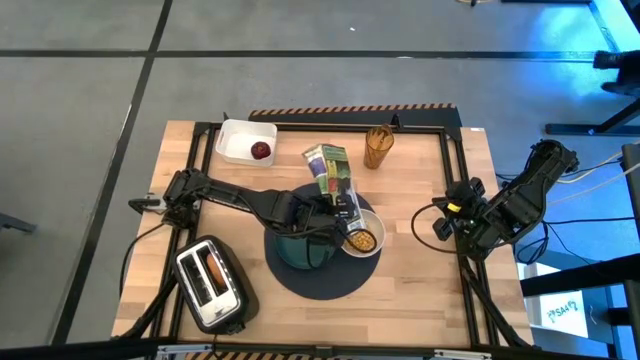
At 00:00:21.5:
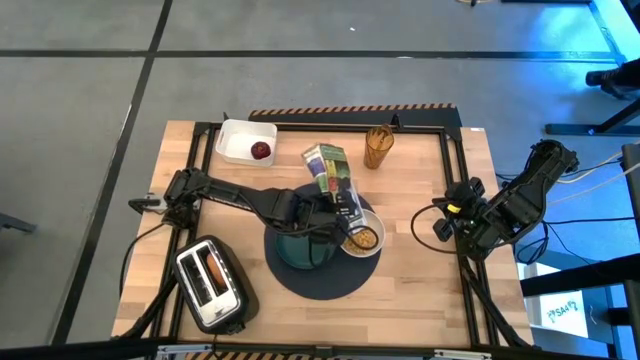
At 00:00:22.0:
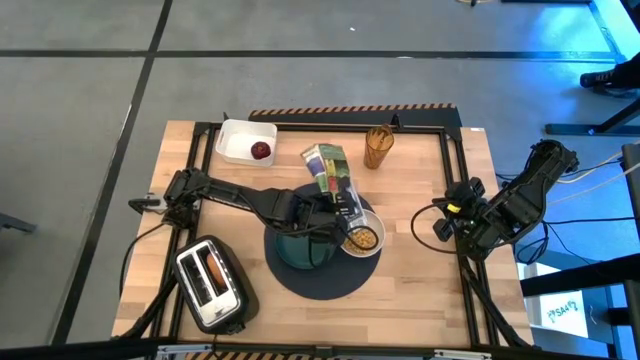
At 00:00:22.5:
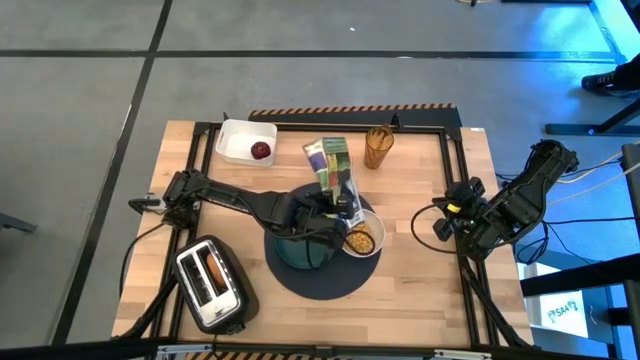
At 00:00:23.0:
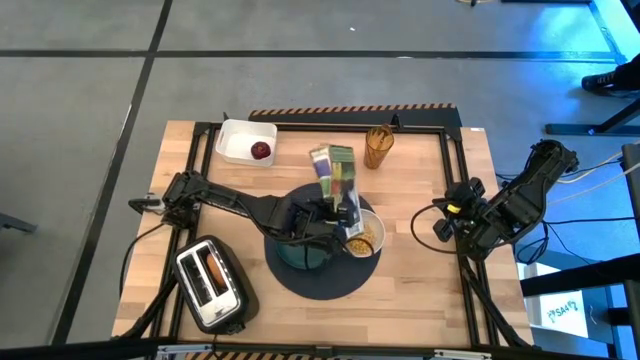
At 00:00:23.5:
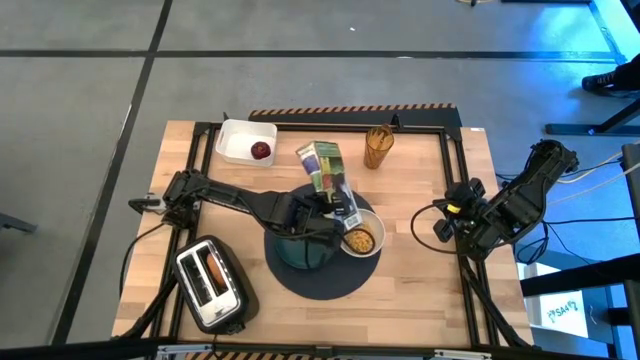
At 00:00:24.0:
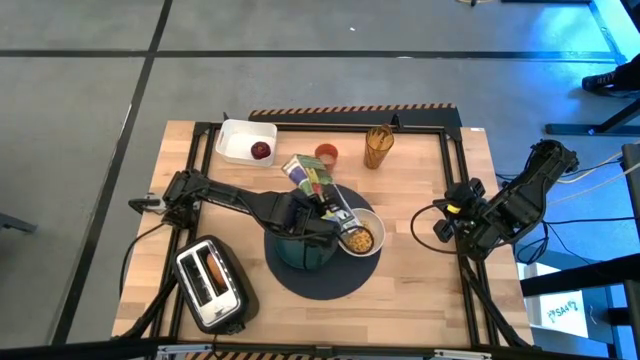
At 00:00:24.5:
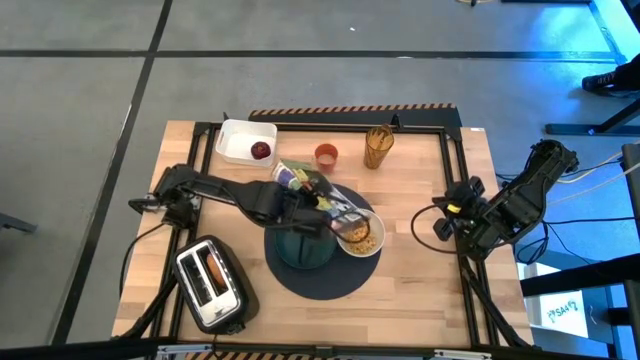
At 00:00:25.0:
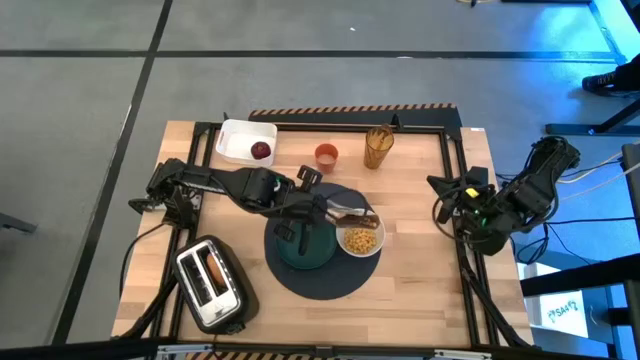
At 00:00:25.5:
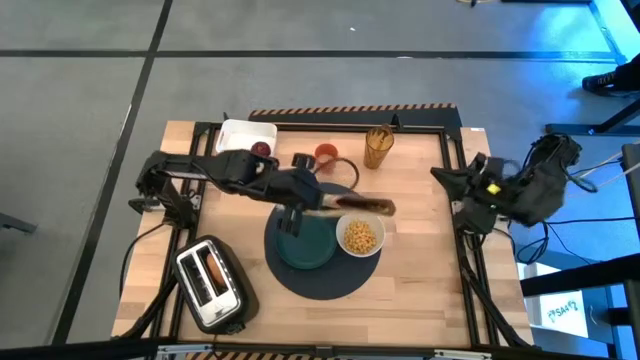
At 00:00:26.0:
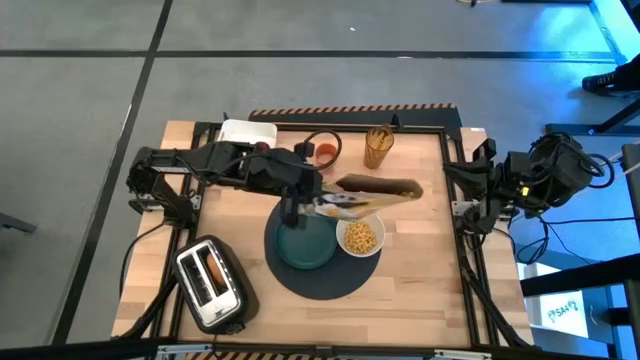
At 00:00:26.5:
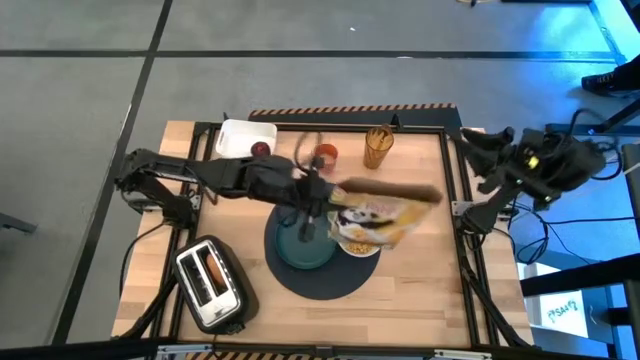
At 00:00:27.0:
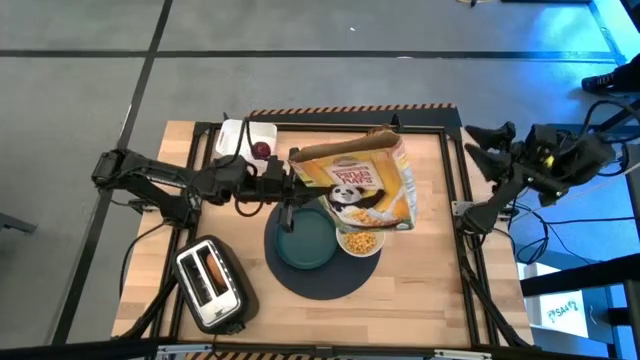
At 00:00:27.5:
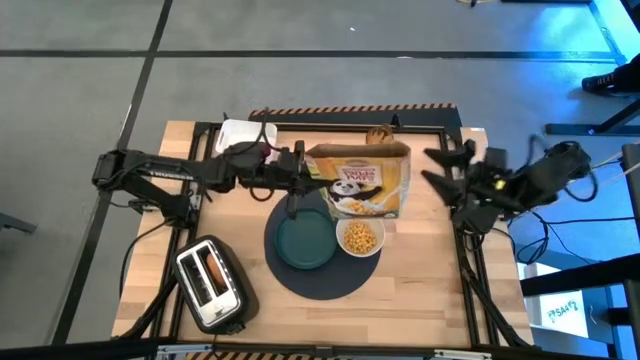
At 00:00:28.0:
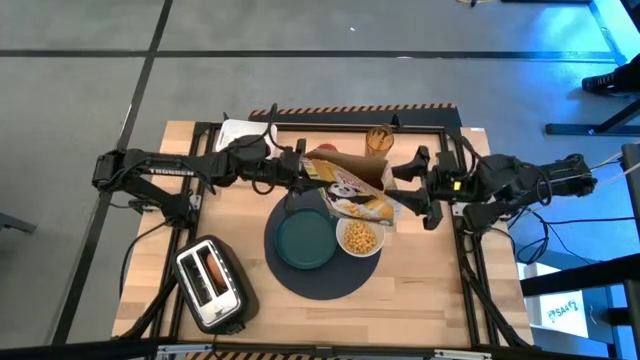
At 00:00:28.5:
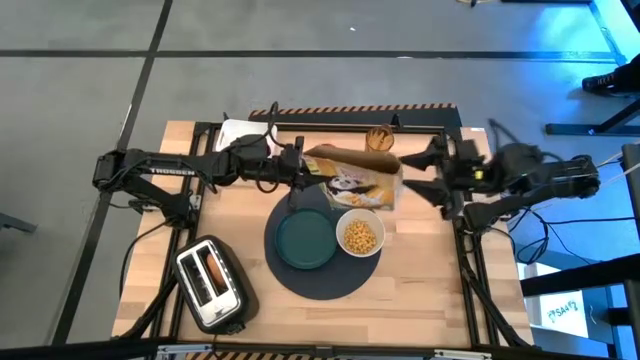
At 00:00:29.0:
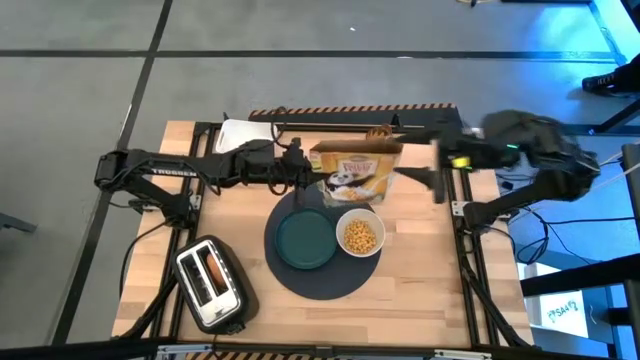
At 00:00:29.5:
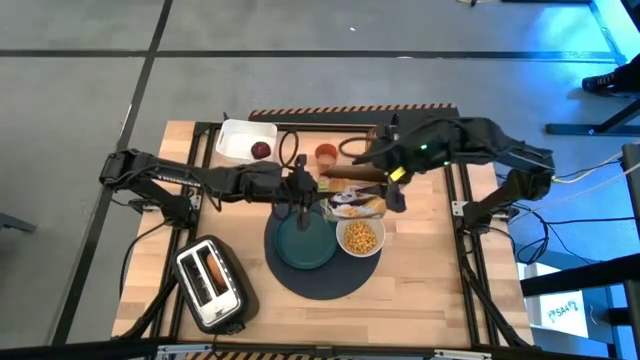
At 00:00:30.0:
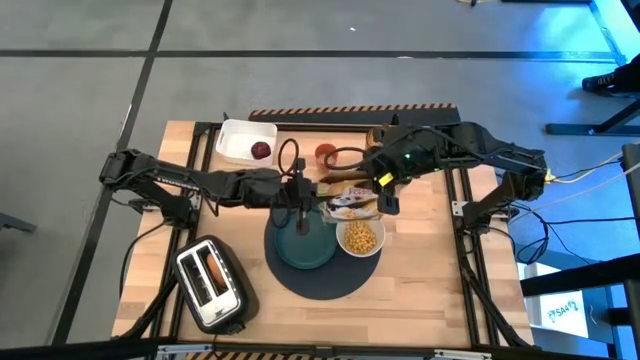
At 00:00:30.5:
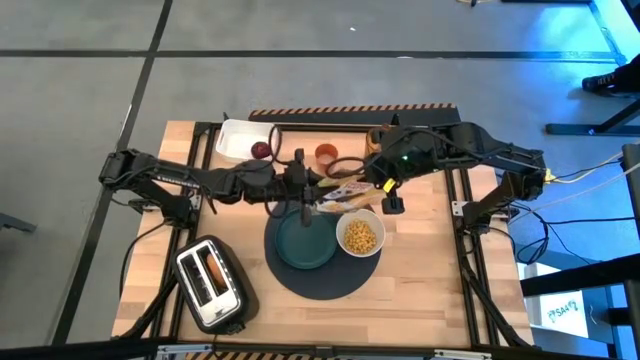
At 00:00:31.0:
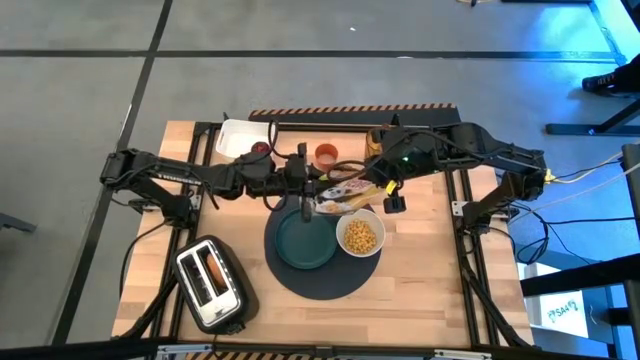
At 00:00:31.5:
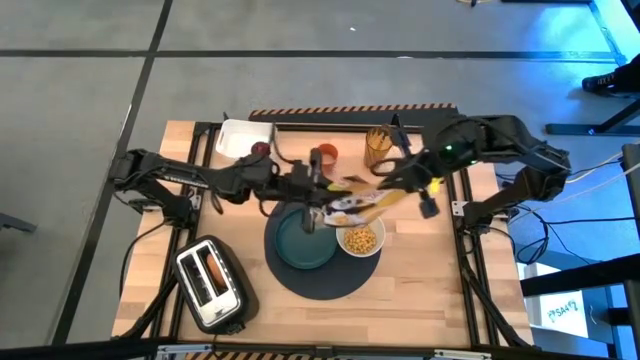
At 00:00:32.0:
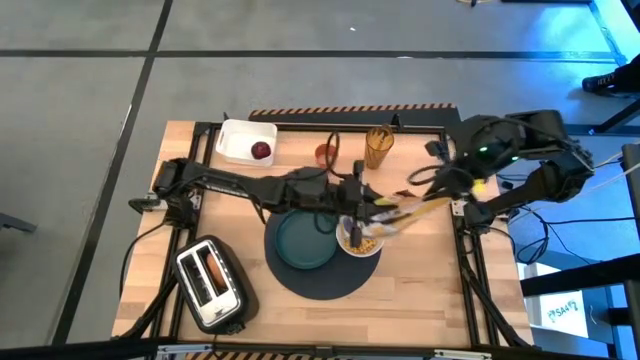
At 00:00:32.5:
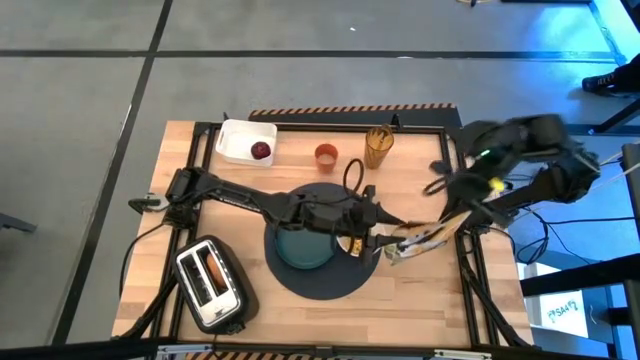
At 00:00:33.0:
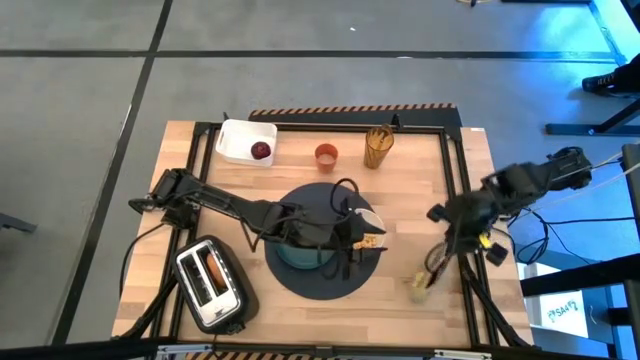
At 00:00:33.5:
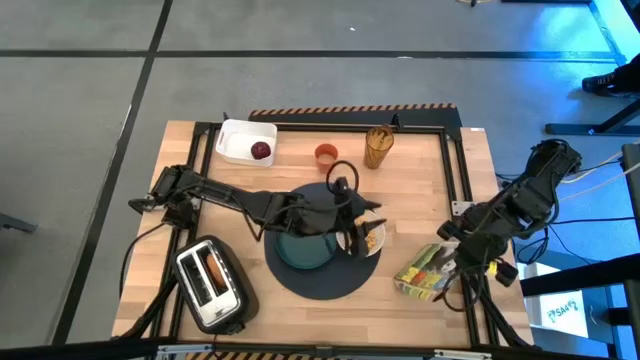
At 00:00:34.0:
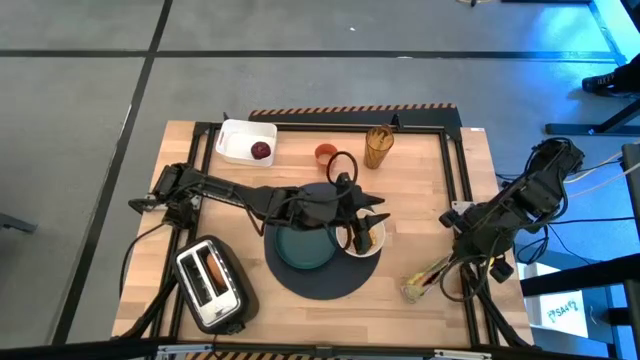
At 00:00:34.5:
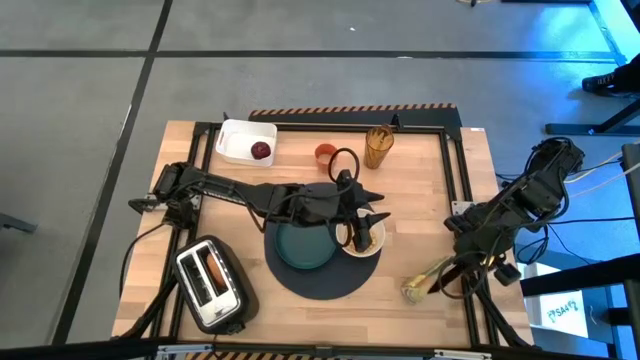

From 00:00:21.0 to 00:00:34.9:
Task: Arrange a breakfast setting
Pour the cereal into the white bowl

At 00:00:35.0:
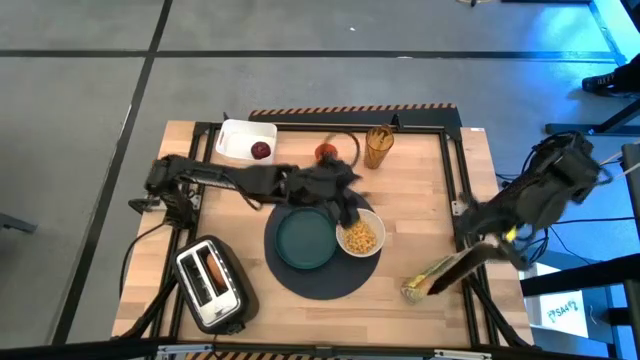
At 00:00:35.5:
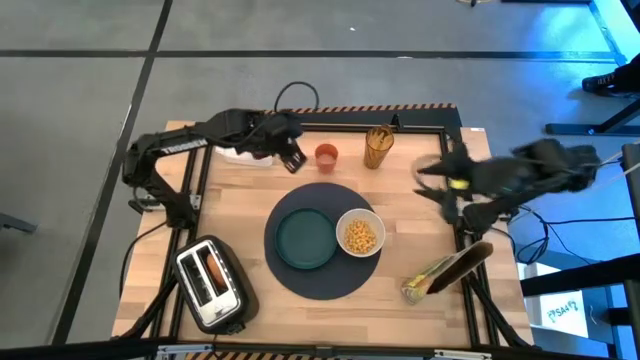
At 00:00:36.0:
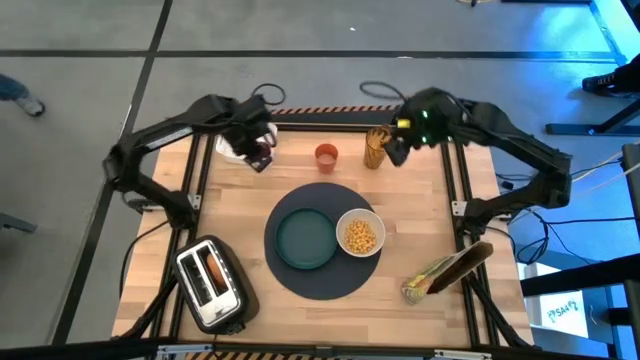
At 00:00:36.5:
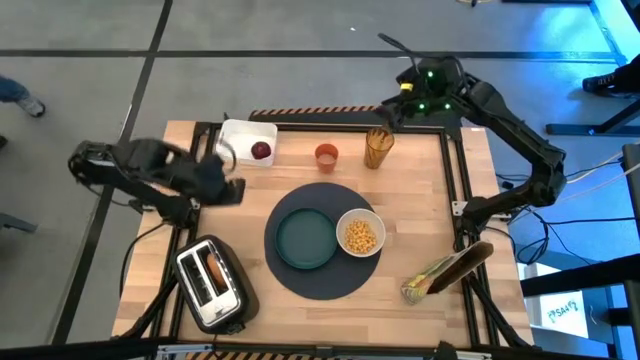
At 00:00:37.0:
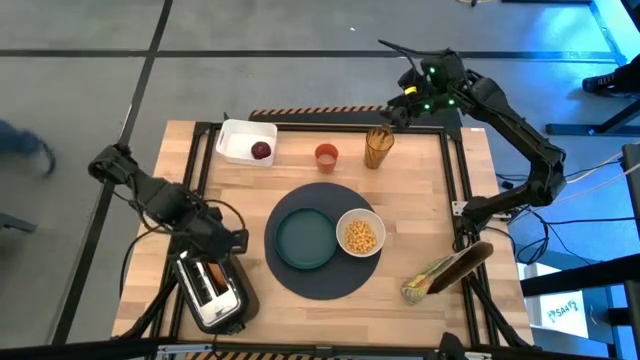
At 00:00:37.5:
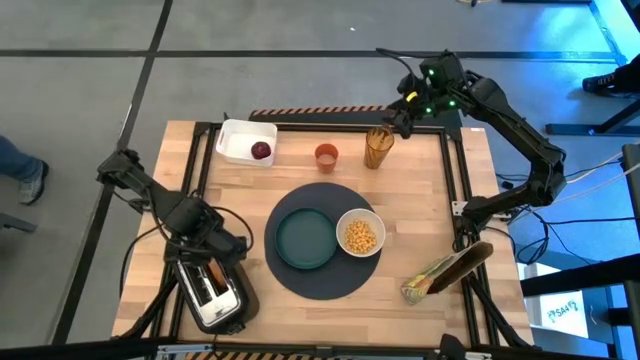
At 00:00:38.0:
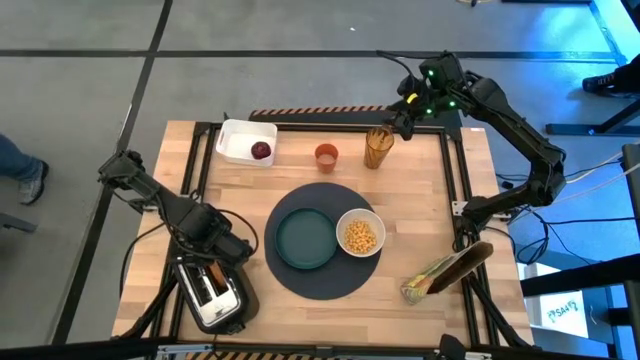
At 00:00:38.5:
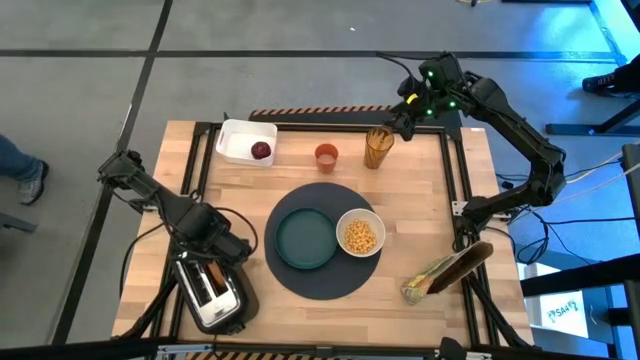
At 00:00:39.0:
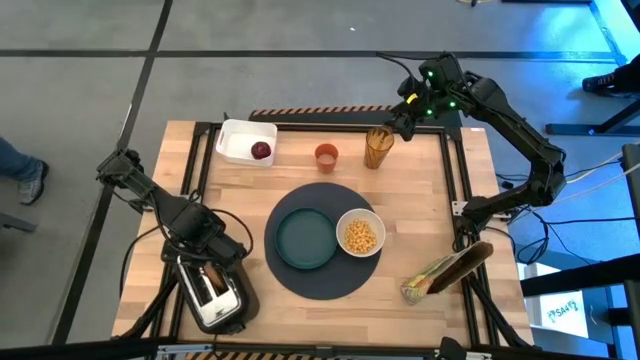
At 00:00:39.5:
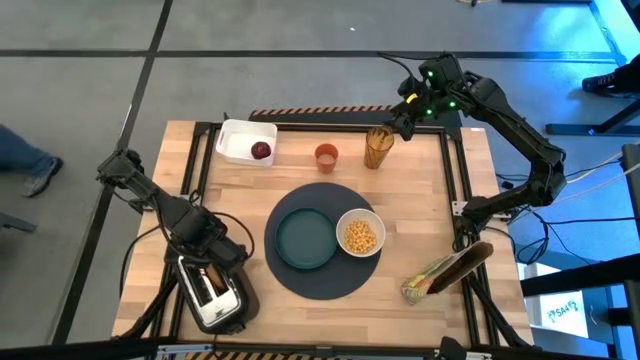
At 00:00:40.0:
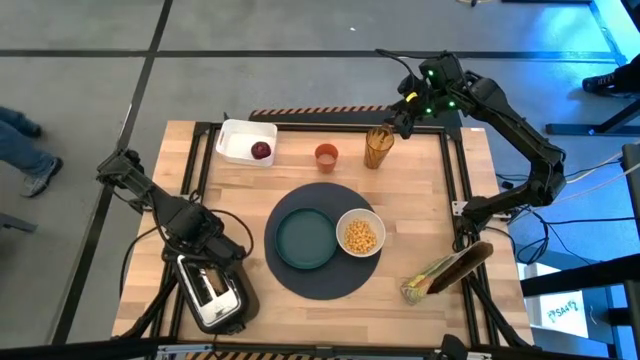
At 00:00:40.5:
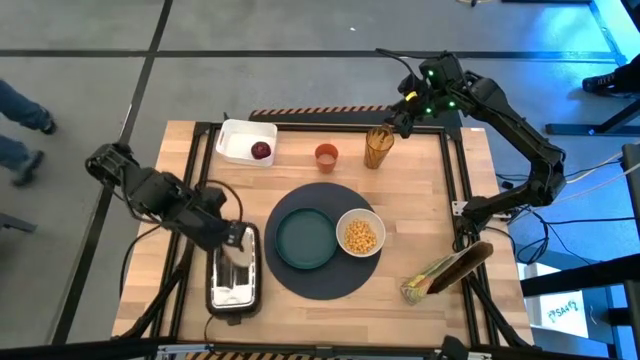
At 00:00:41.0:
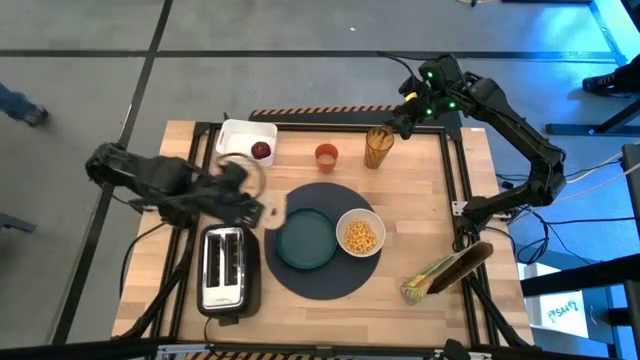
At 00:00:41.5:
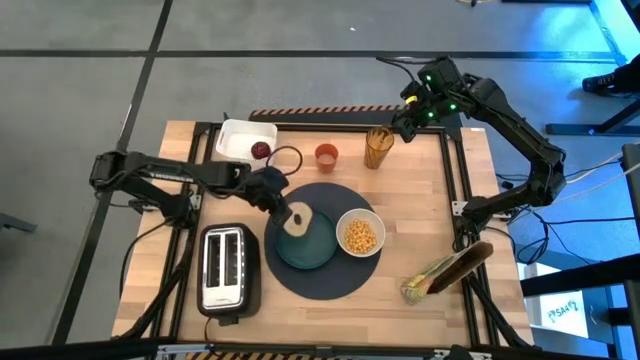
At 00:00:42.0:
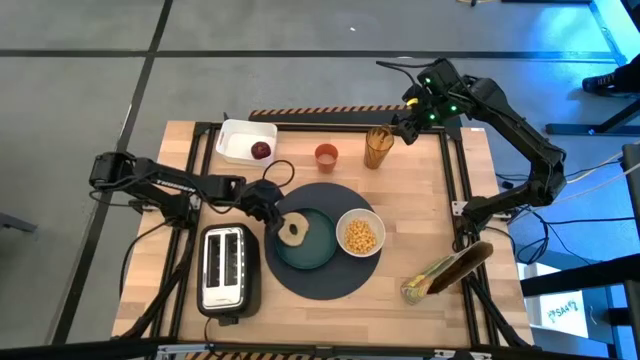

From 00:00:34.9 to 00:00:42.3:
Put the bagel on the green plate
